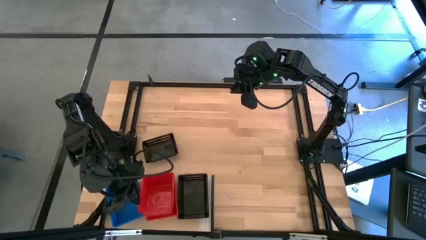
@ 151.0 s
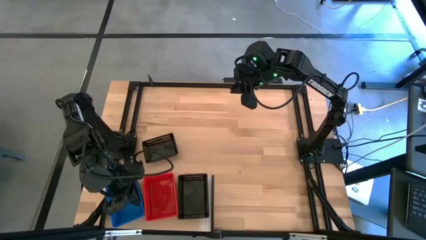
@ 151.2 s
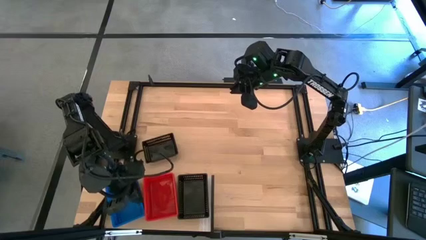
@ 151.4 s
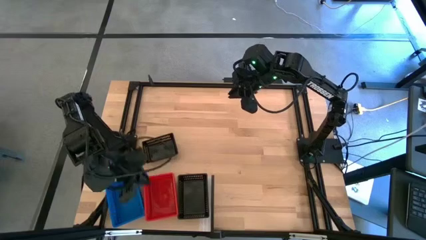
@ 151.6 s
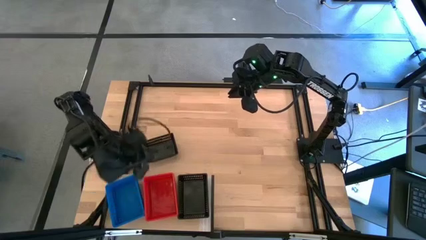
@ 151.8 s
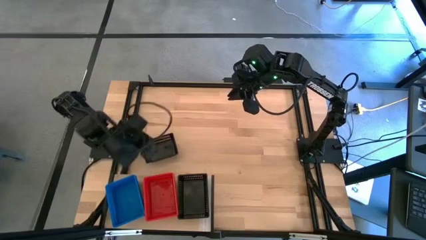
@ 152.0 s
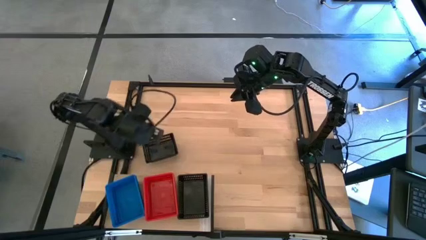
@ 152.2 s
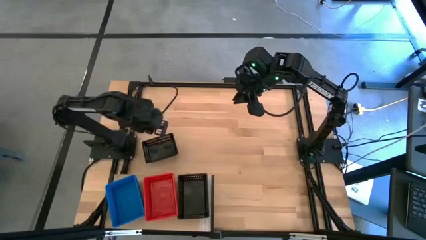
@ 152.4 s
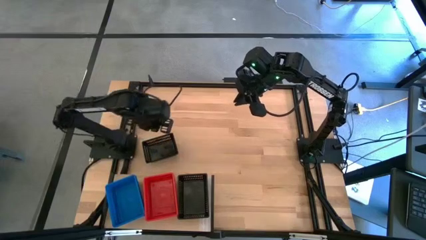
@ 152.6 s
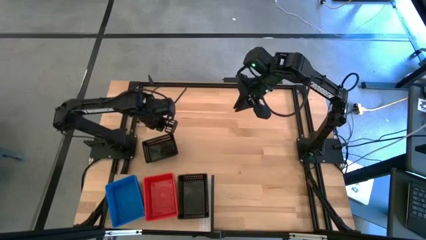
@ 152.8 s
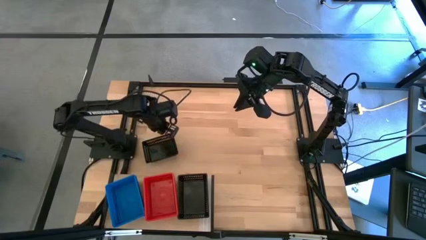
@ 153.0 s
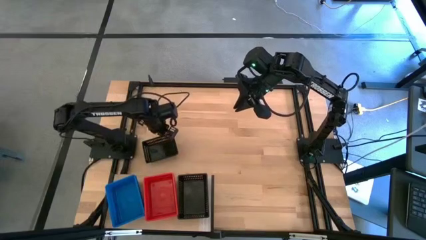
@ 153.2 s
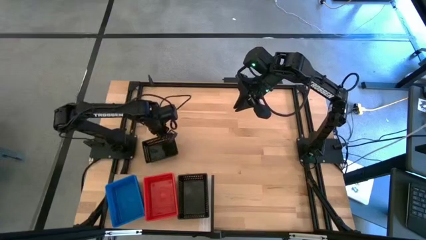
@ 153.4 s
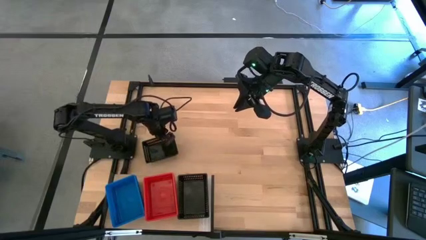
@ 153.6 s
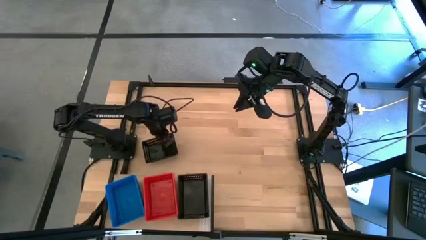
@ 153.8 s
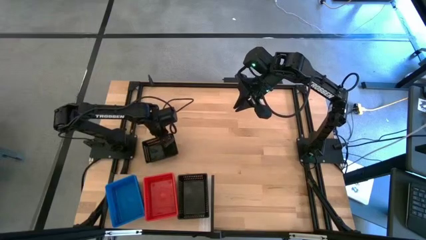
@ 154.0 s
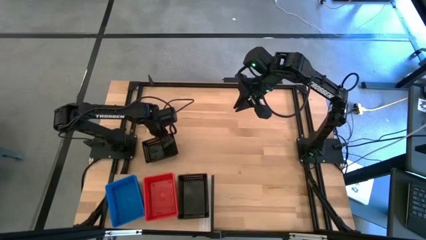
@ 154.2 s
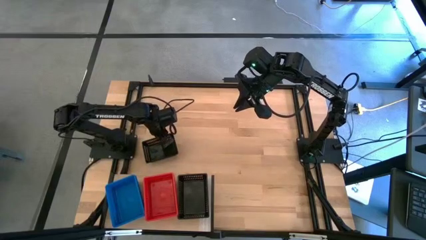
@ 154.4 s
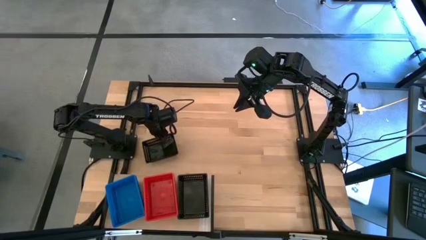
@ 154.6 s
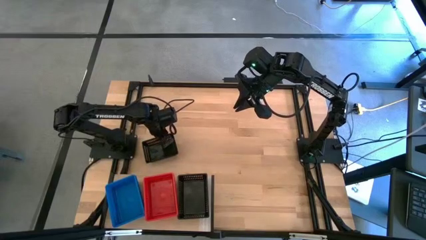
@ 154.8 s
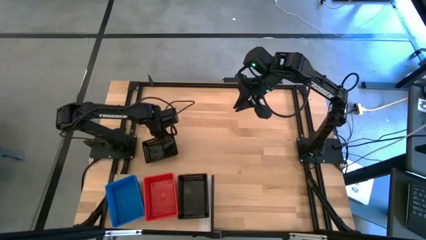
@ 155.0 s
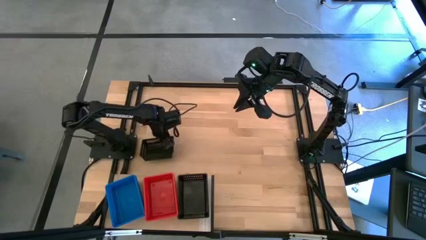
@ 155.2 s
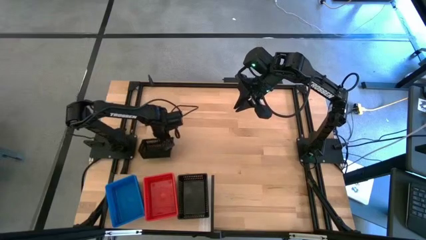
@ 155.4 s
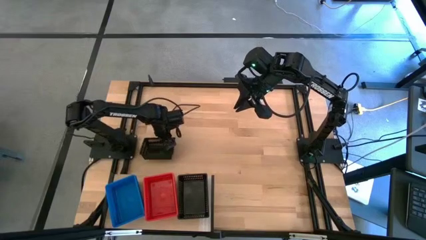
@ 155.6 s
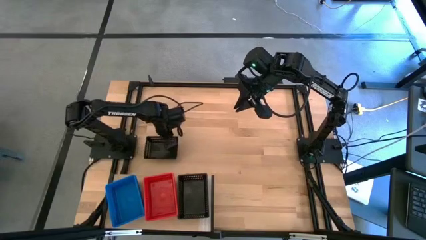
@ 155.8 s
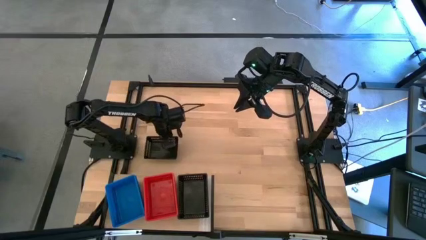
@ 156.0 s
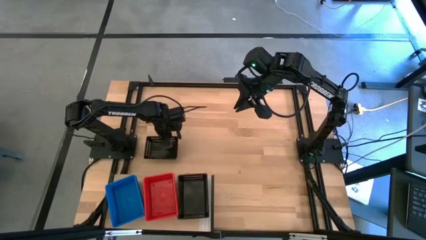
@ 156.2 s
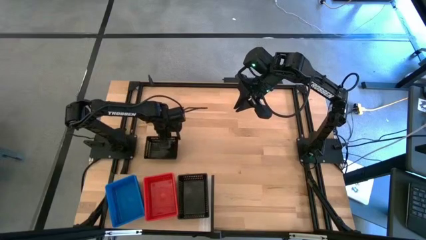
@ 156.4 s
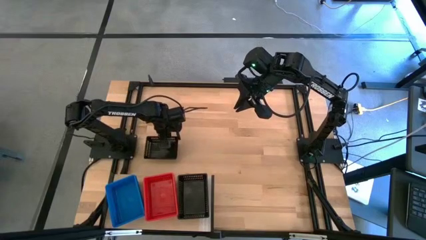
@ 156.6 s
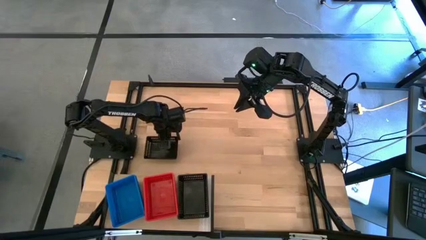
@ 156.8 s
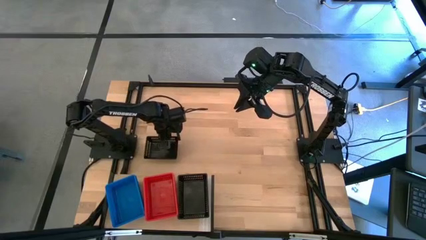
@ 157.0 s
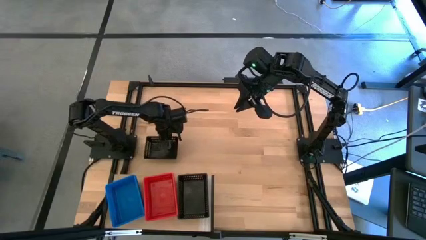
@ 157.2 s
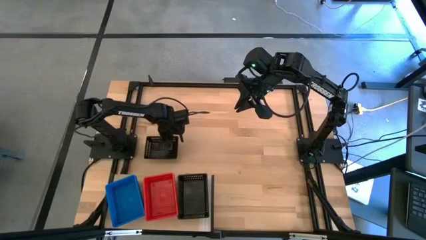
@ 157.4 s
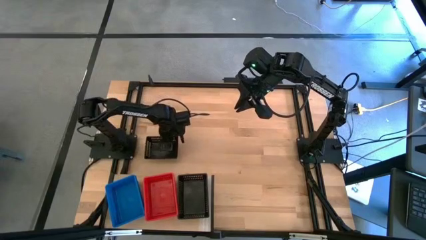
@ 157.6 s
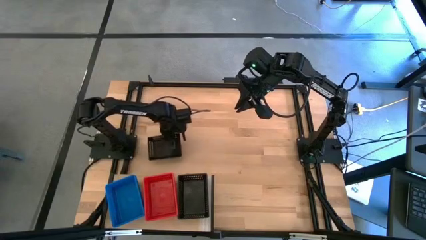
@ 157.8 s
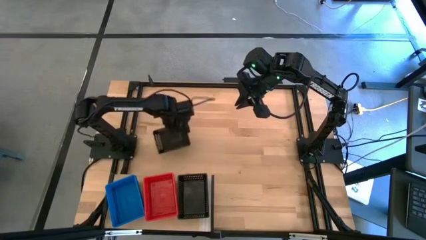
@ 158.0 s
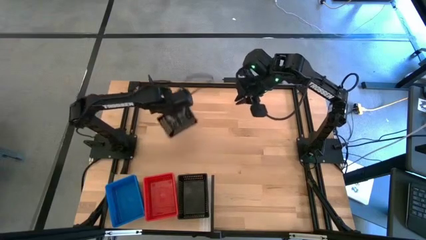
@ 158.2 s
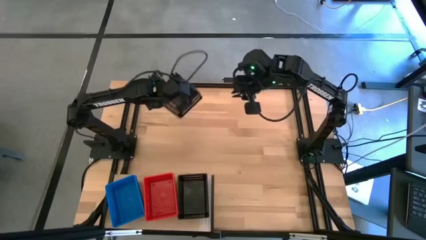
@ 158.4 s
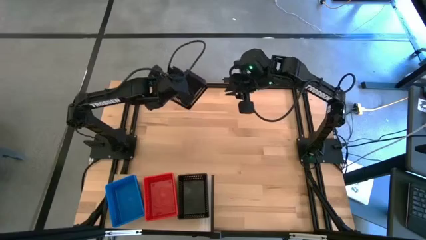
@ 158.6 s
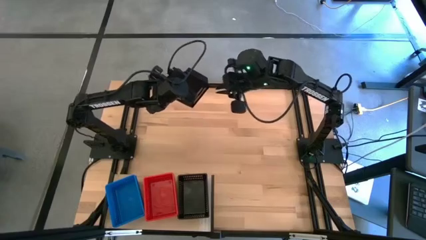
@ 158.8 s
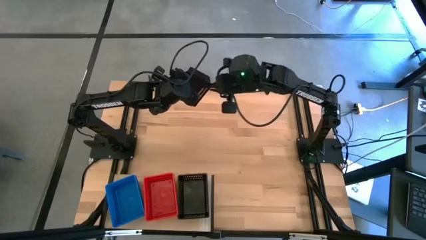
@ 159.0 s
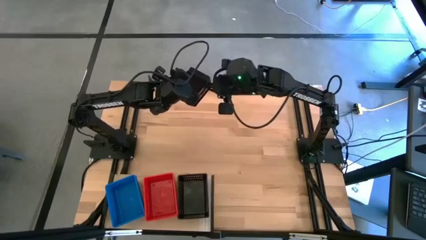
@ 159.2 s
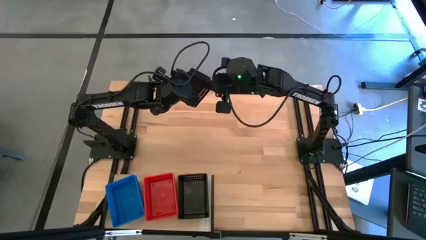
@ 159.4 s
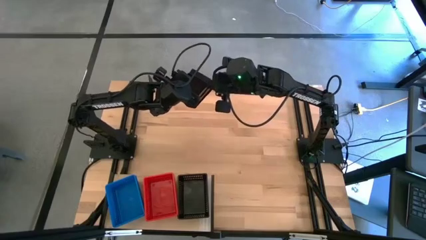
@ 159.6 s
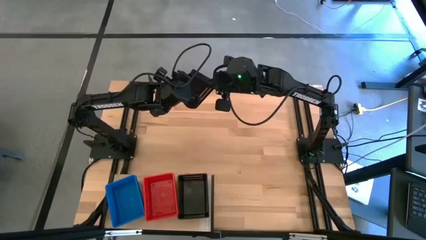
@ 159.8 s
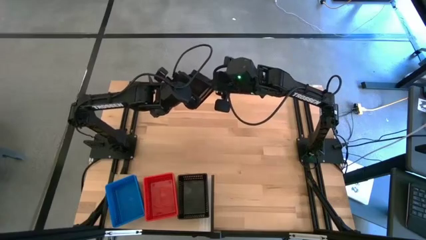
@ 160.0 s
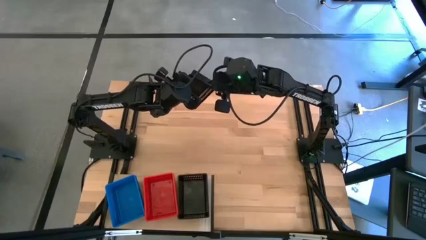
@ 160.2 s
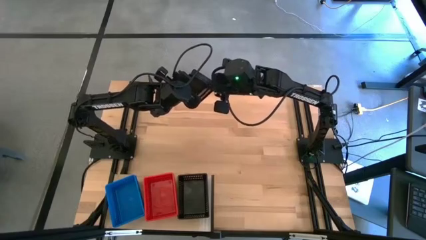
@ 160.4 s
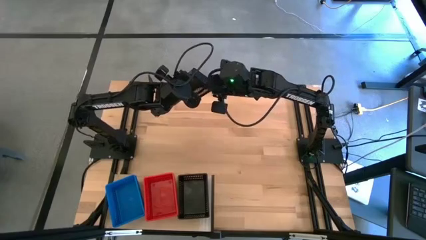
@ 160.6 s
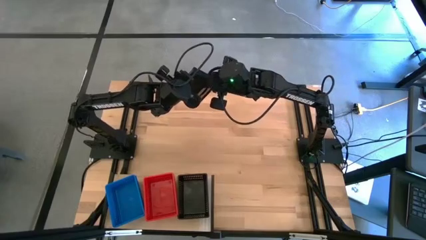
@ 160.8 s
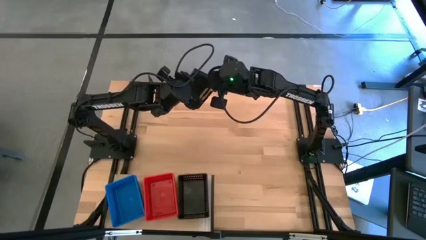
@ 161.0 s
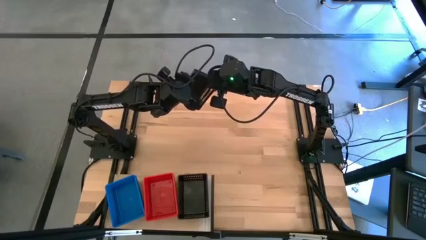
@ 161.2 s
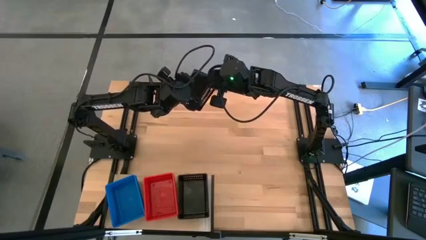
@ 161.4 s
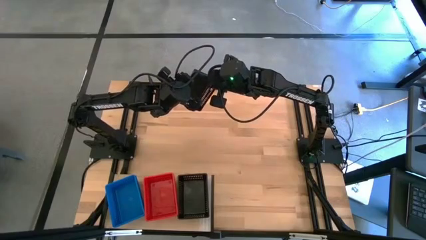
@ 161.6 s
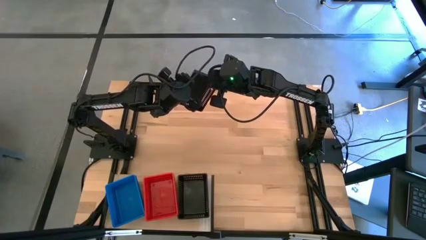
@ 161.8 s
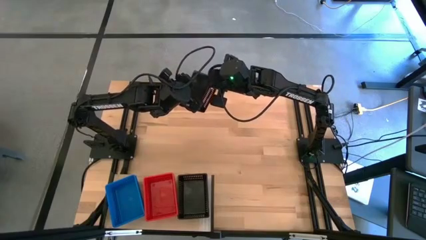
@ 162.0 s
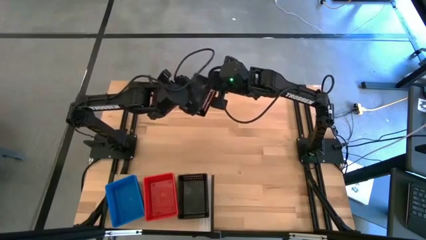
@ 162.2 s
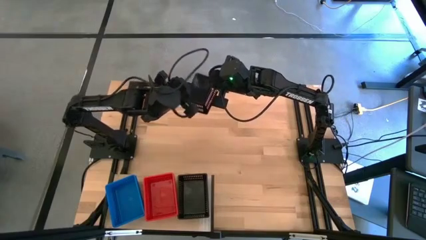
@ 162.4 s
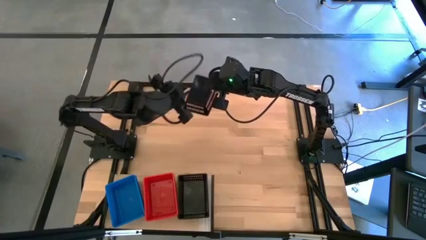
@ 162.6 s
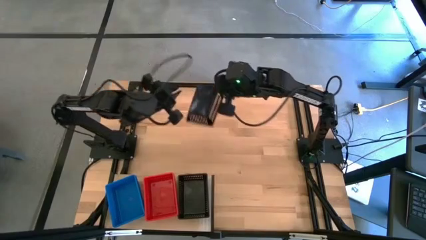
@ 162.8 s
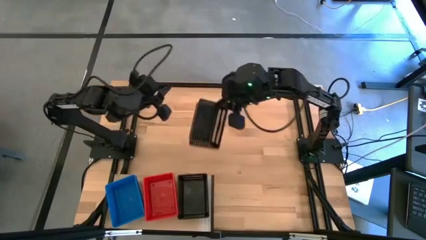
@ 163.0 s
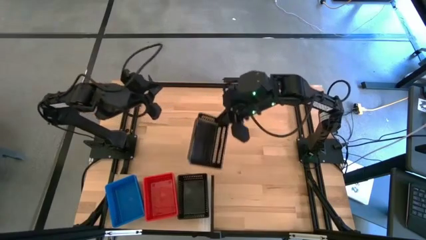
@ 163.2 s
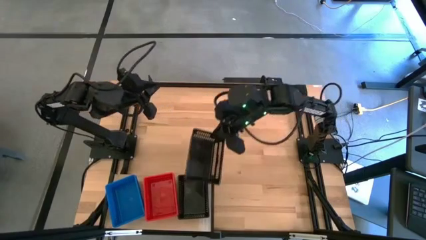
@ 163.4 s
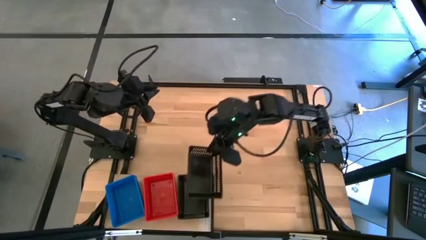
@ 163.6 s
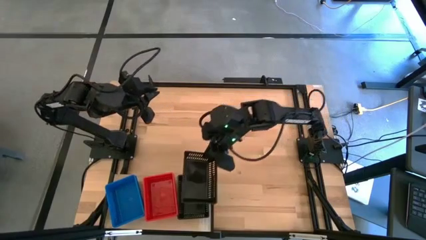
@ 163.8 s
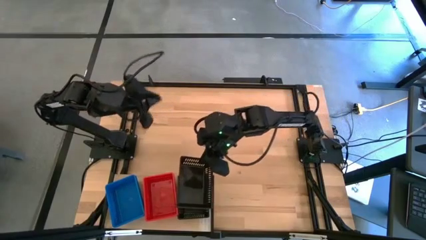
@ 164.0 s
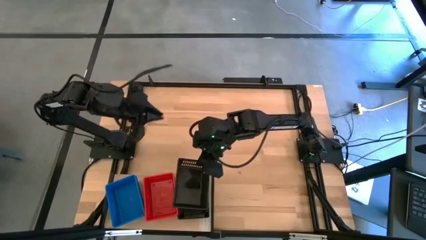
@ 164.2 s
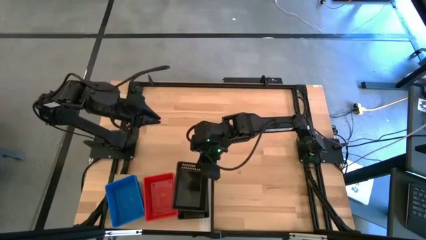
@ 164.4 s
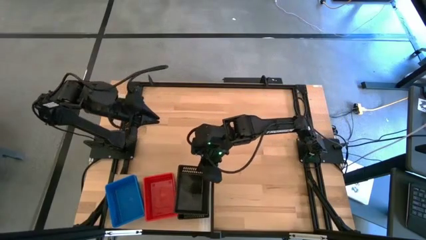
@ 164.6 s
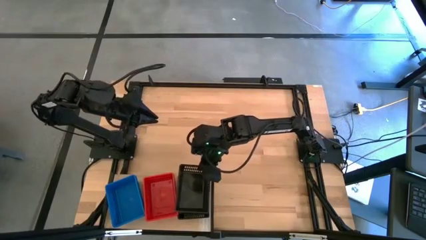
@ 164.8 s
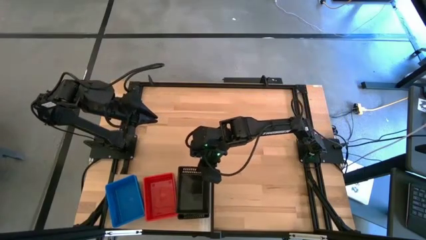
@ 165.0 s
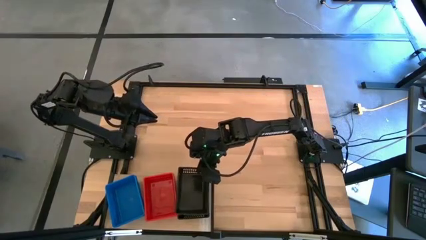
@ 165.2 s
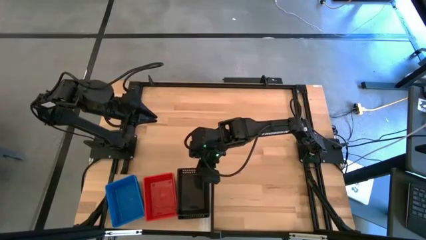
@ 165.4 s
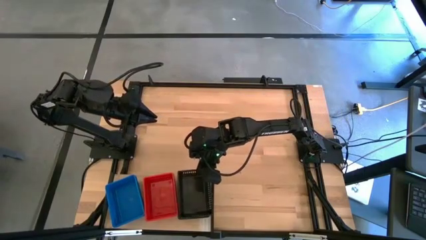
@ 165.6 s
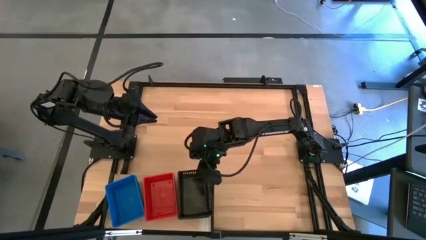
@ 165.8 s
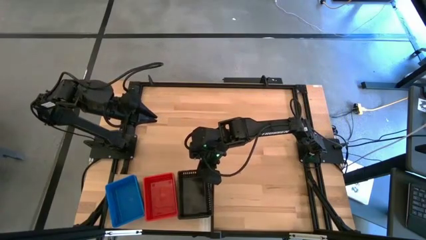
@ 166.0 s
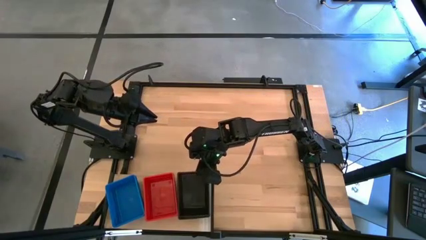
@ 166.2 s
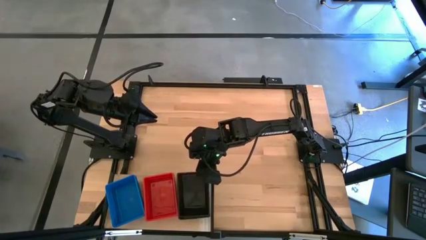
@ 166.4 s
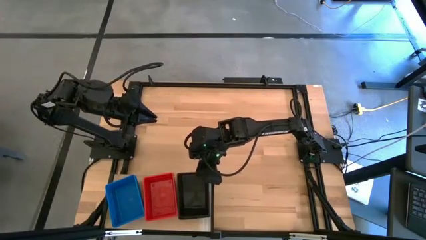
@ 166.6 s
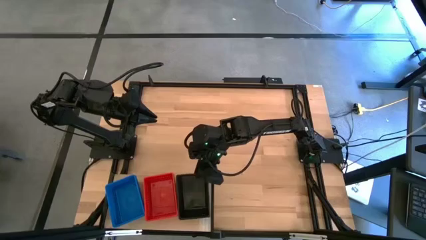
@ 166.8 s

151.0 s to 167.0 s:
Task: Stack baskets on shelf by color
Stack the black bin on top of the other black bin on the shelf

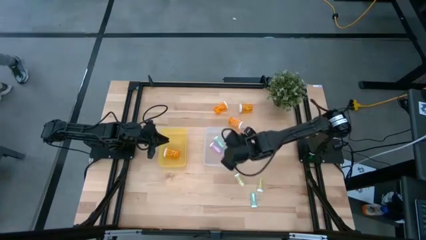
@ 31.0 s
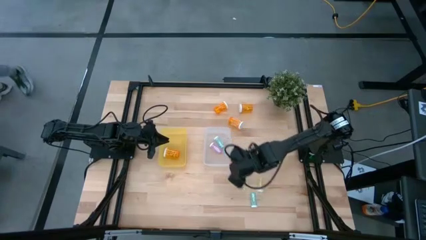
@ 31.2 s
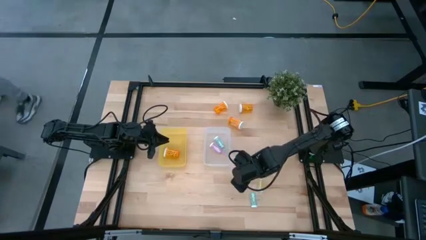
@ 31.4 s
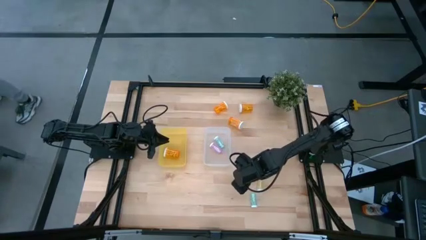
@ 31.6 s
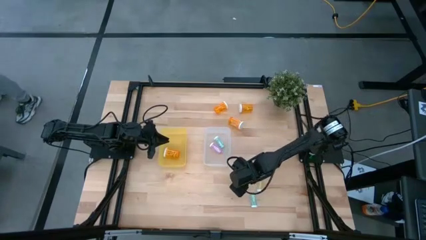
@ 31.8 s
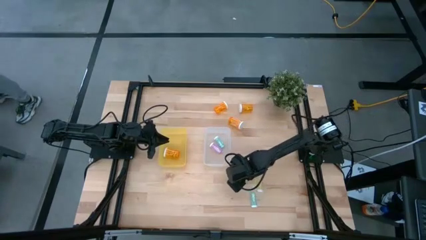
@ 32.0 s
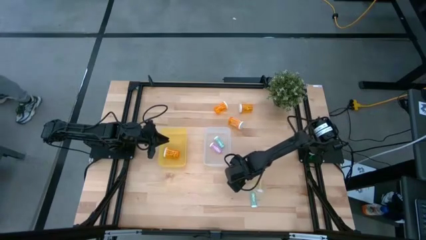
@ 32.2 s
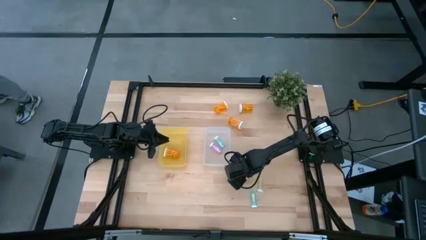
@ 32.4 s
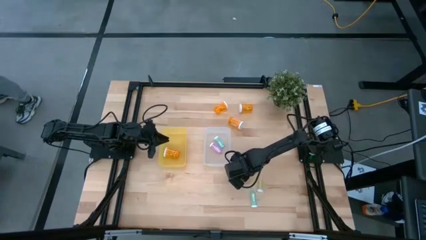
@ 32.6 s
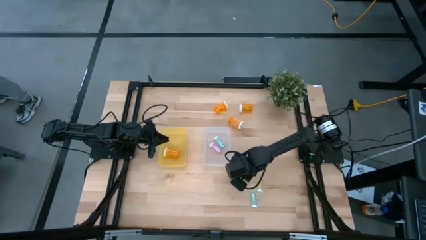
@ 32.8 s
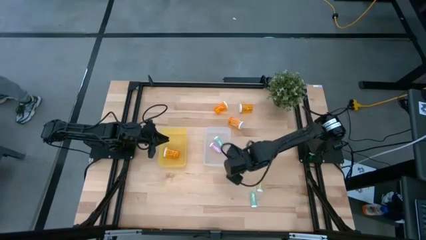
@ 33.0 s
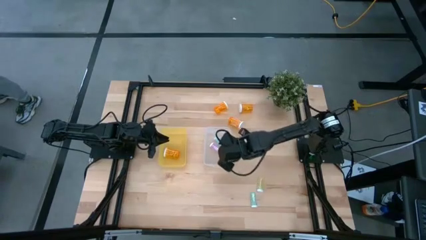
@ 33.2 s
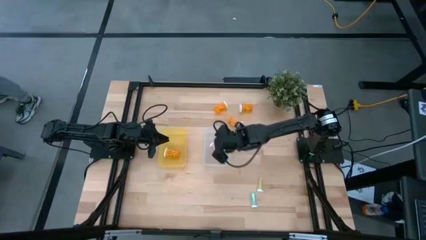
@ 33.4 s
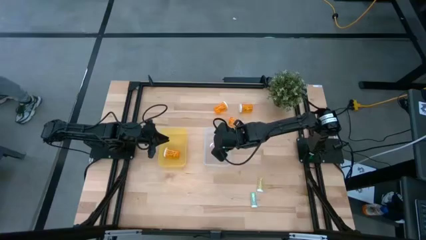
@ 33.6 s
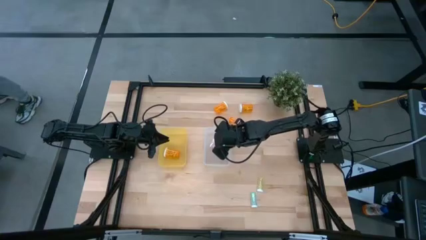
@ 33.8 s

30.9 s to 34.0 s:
Task: Pick and place medicine bottles into bin by pill shape (circle, oval)
Put the yellow pill bottle into the transparent bin
